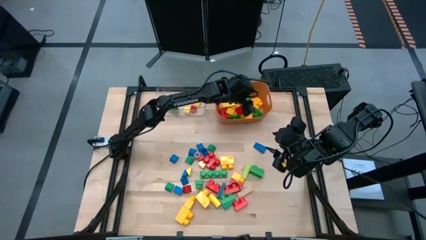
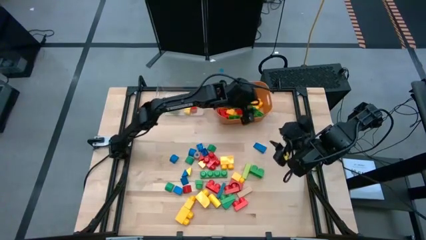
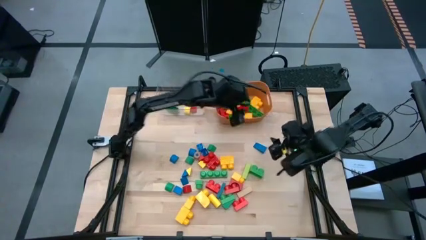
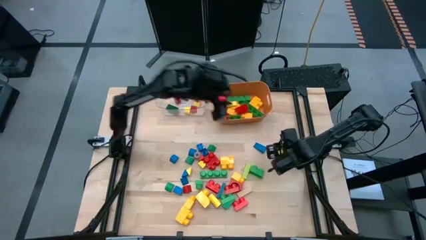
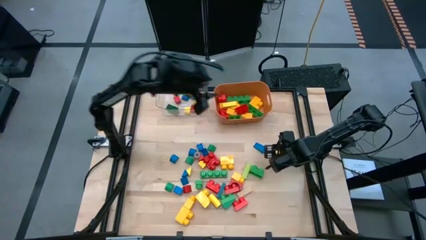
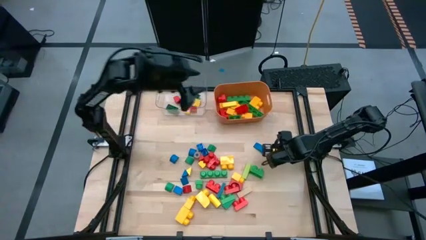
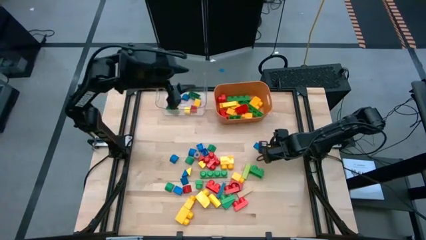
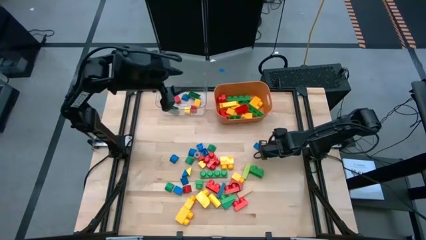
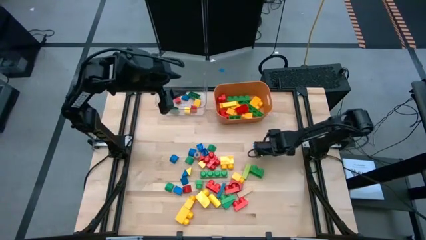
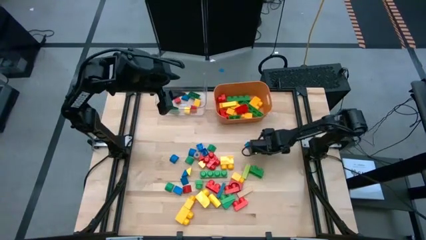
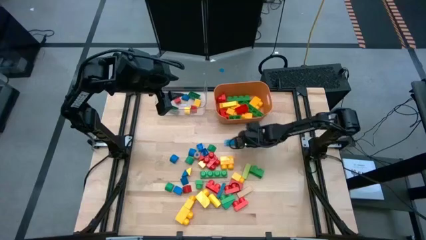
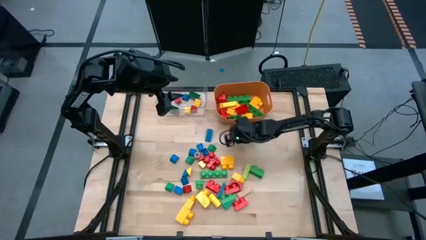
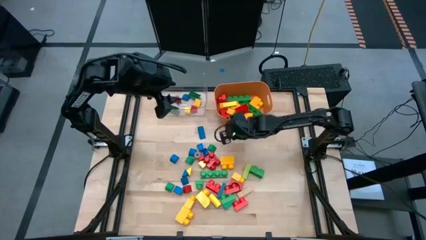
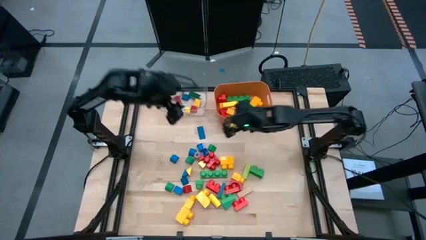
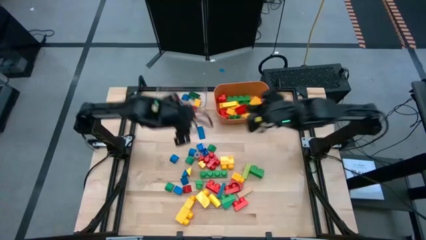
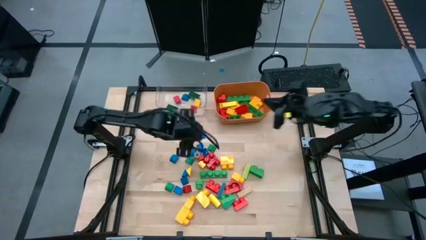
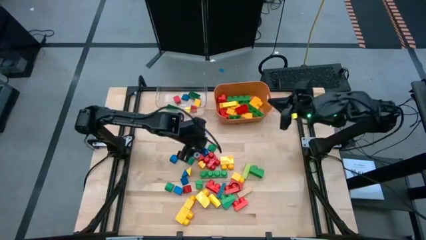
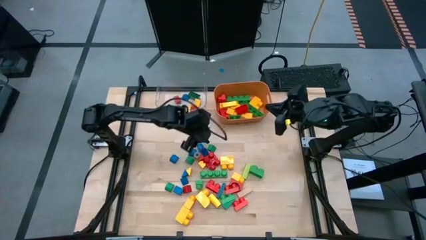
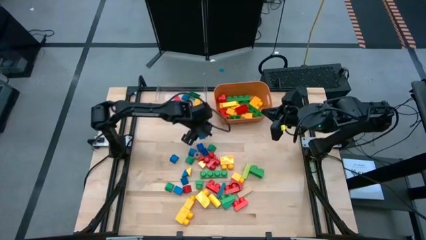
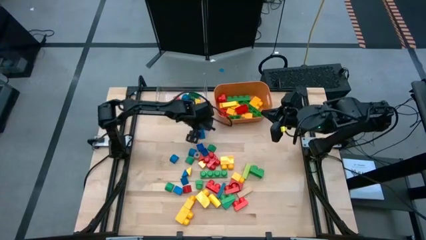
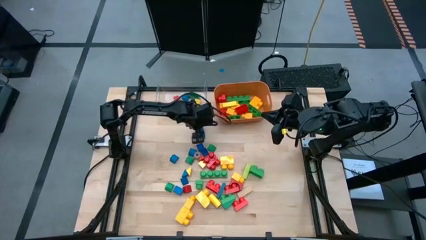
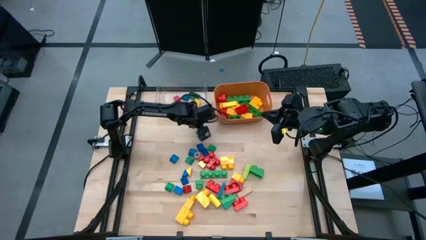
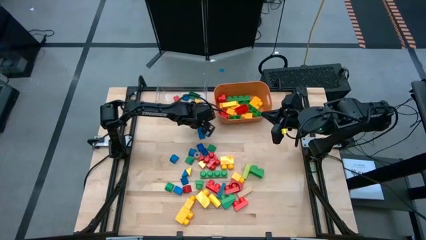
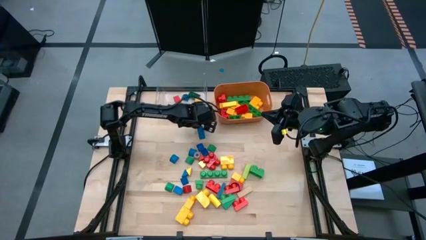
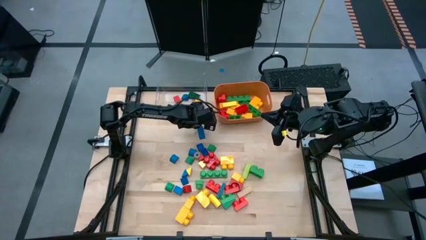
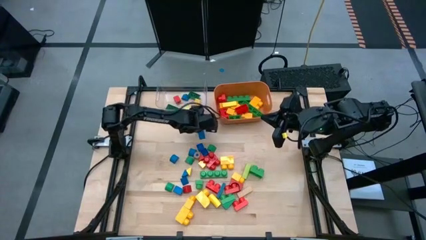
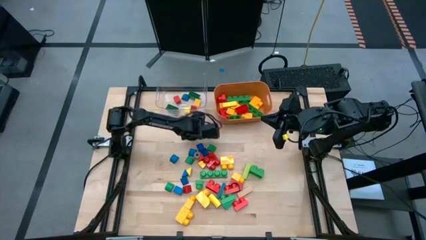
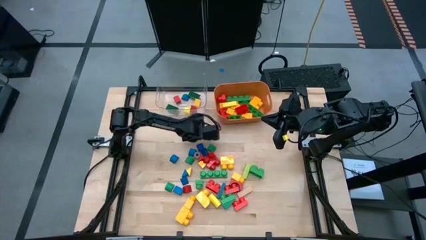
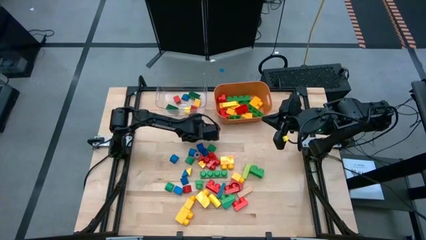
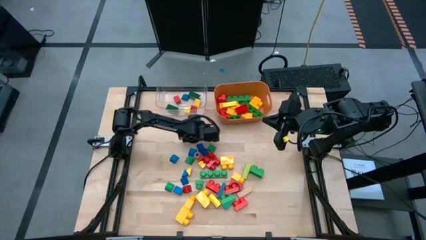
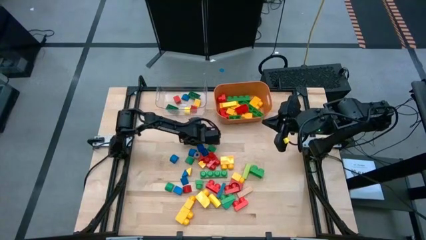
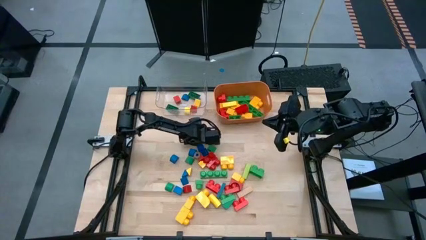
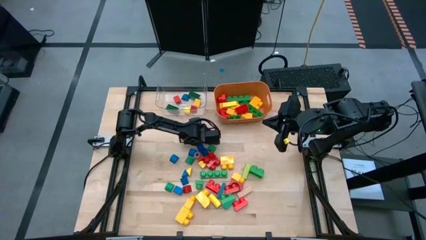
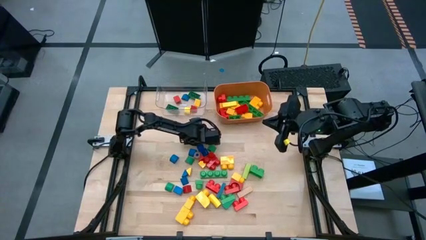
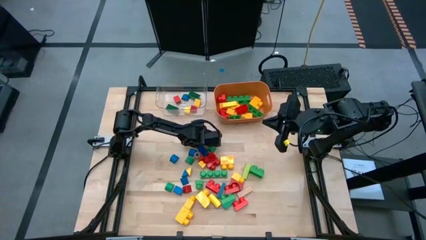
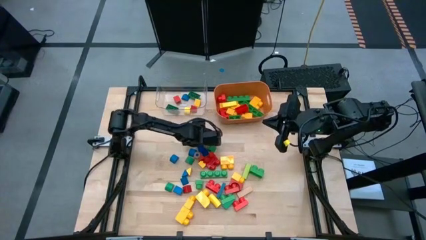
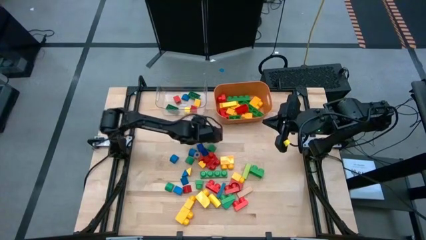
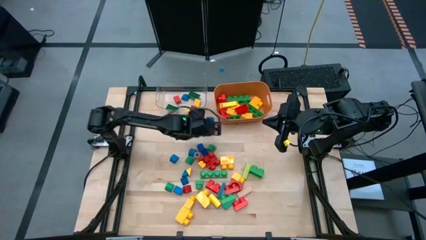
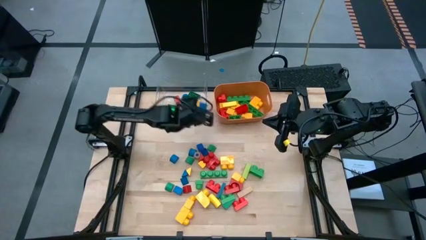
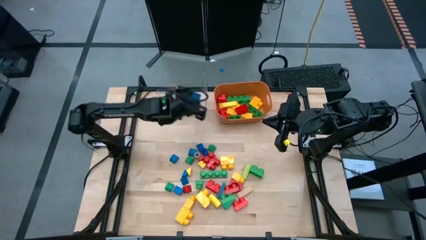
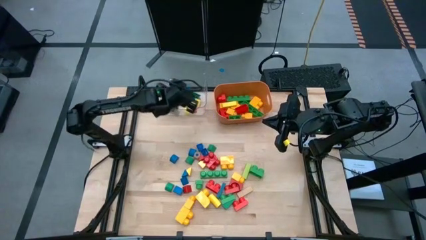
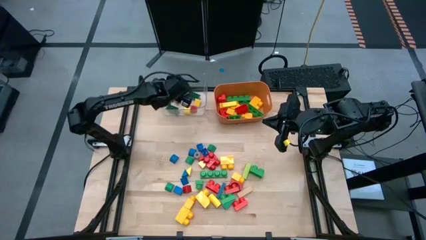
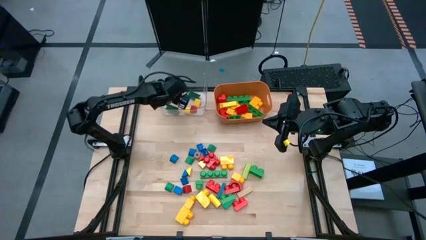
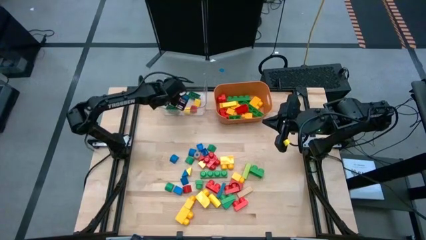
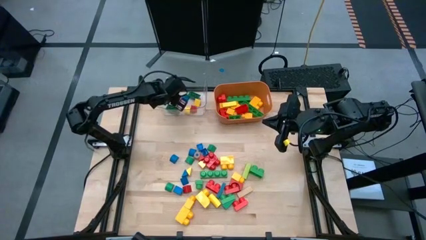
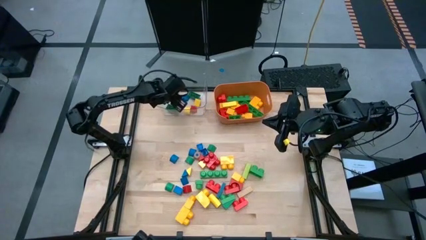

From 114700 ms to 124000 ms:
Task: Sort blocks by size
Put the small blue block into the transparent bin

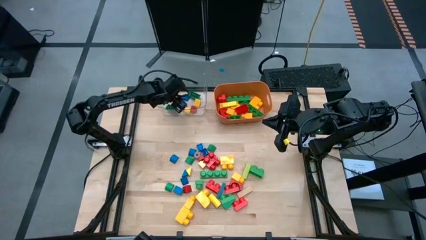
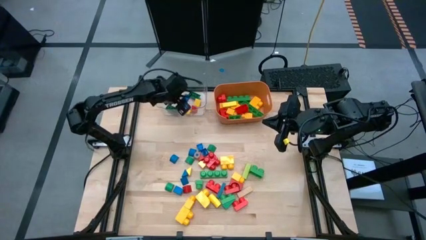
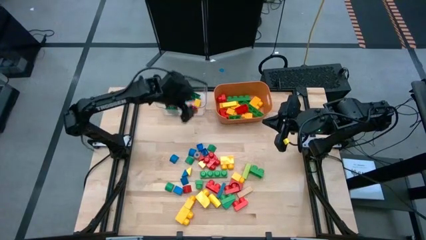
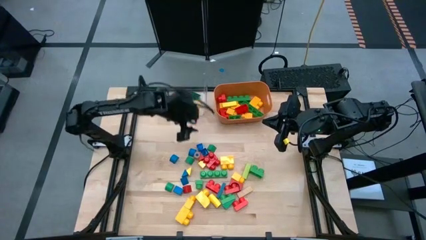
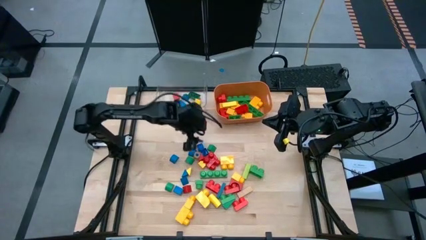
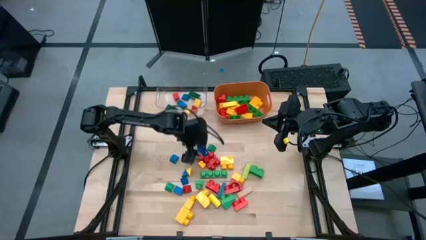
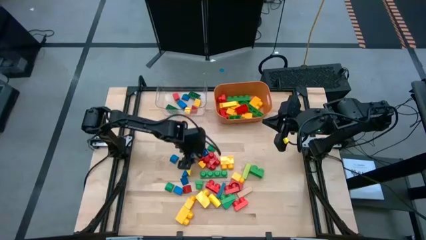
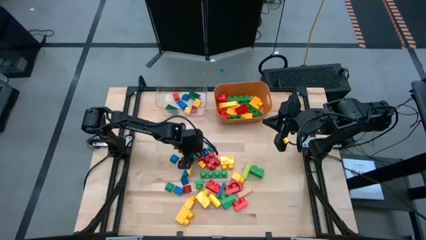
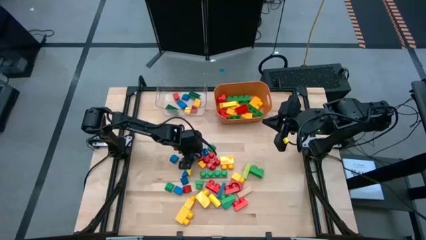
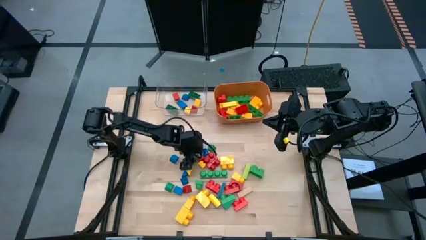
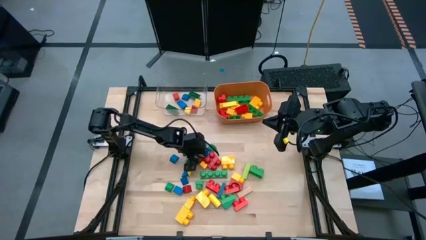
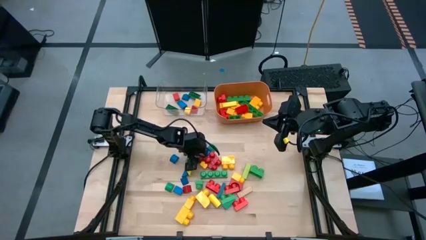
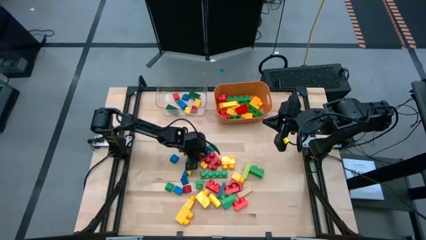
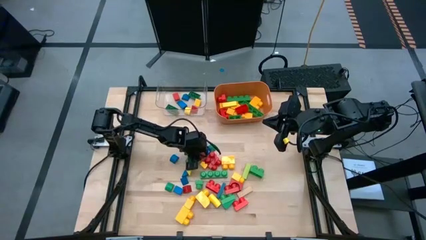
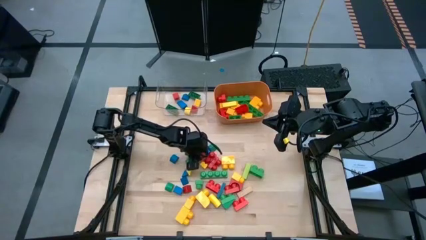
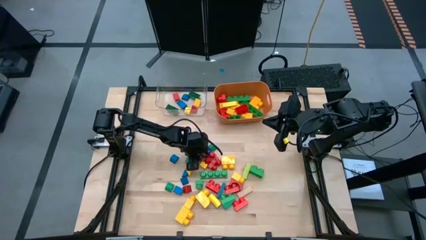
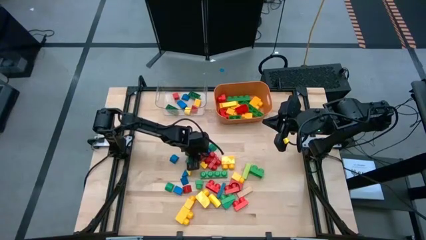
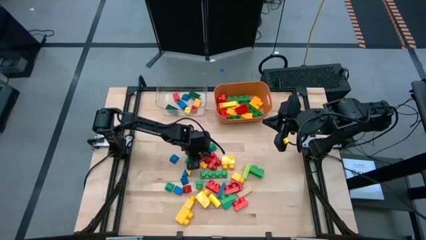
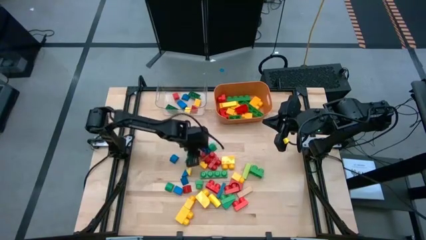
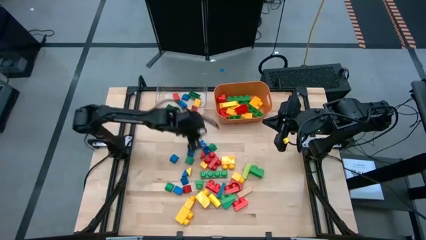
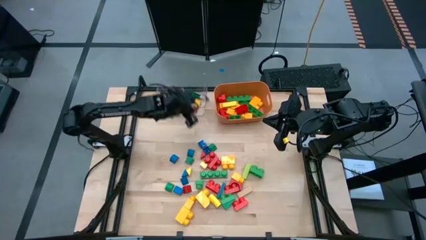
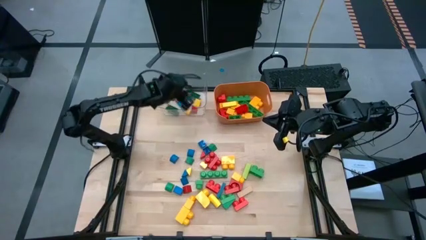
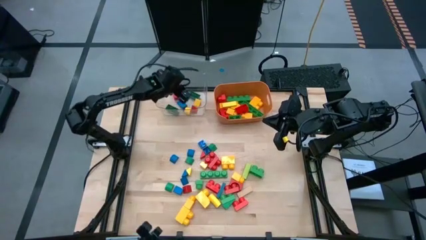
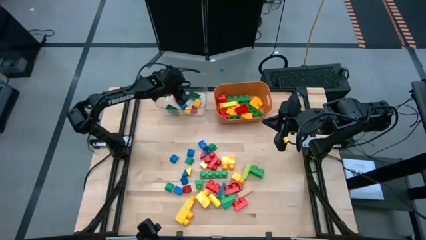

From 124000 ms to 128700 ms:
Put the small brown block into the transparent bin

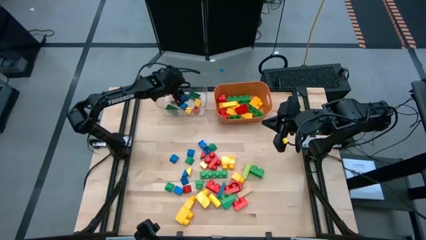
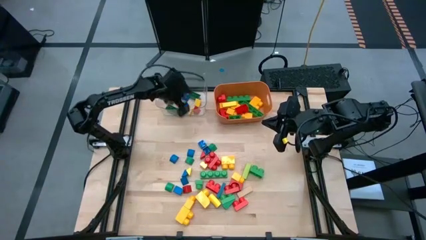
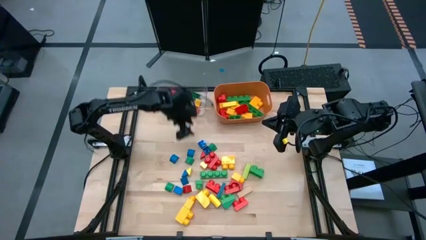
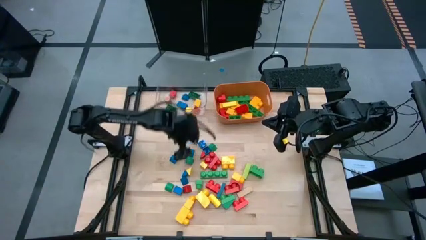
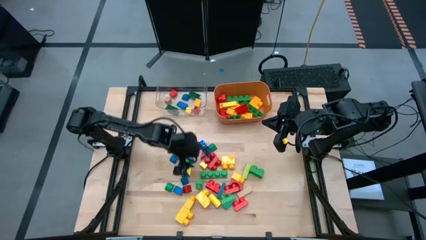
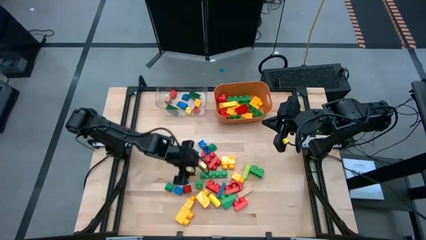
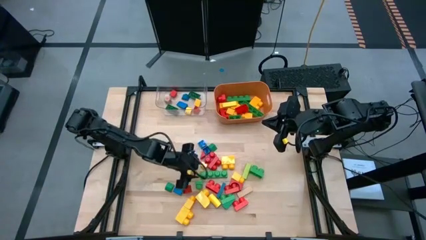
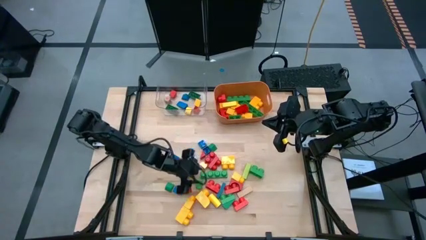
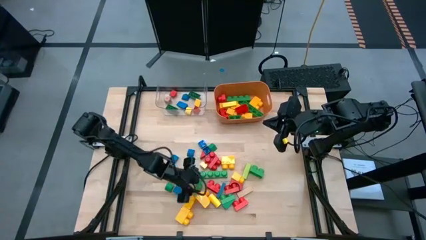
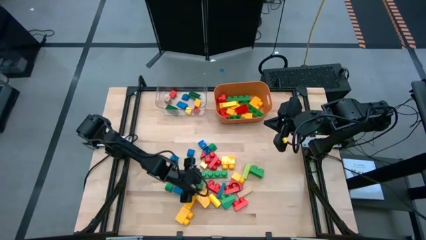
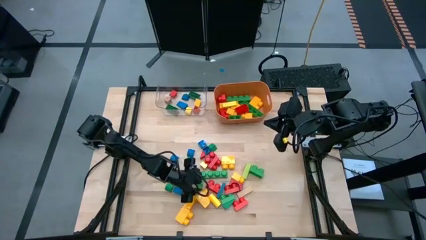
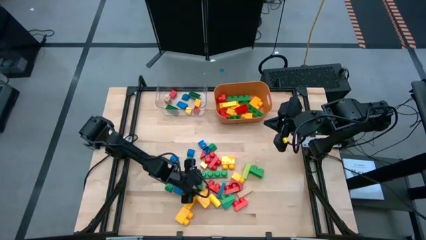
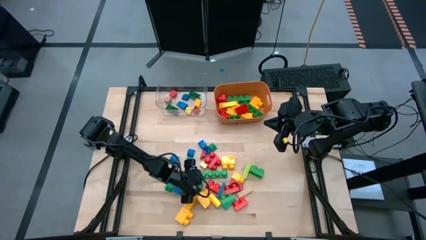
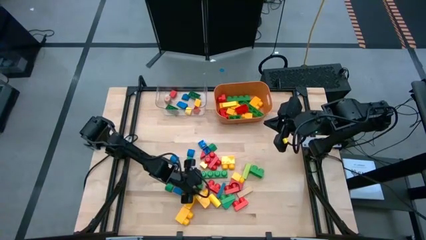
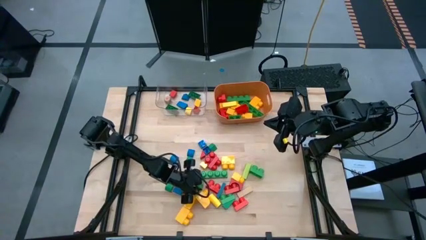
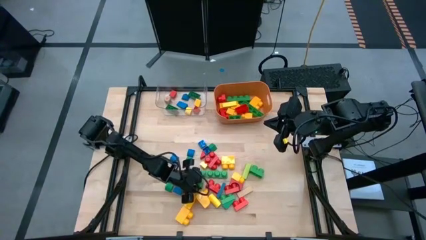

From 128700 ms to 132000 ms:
Put the big green game piece into the orange bin
